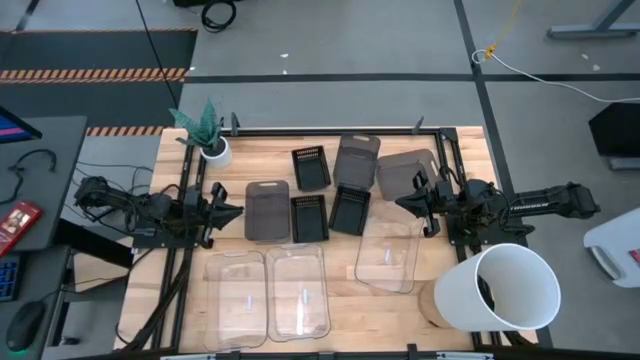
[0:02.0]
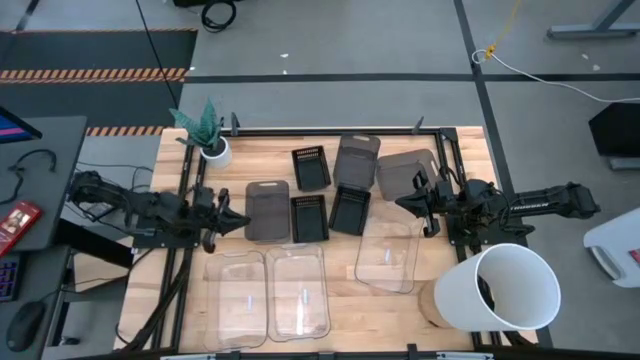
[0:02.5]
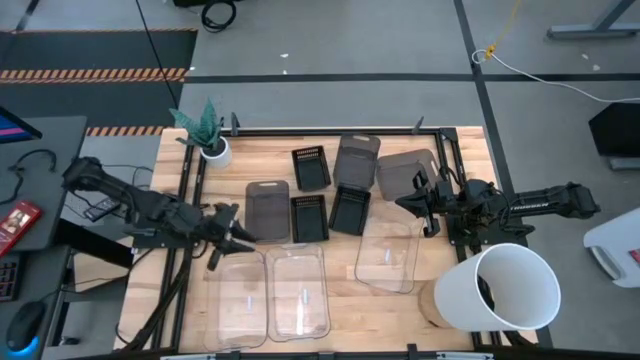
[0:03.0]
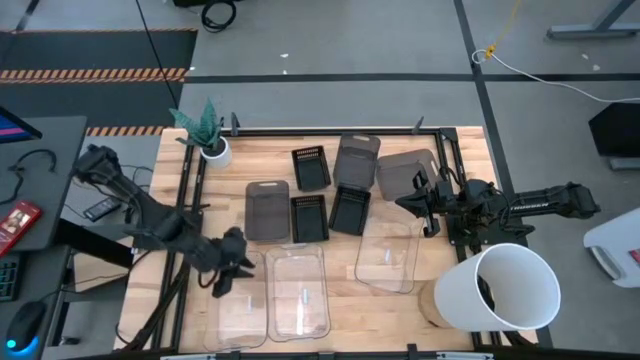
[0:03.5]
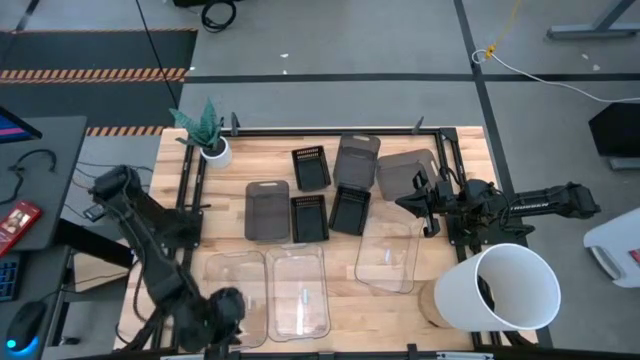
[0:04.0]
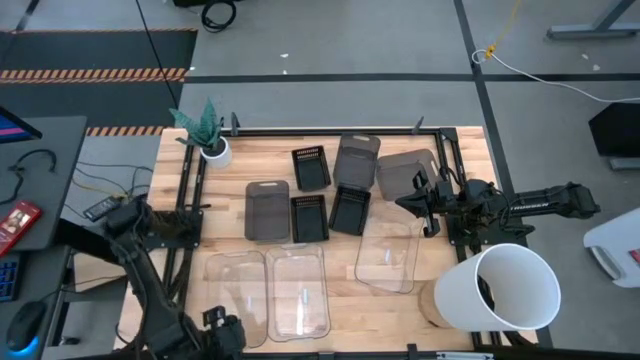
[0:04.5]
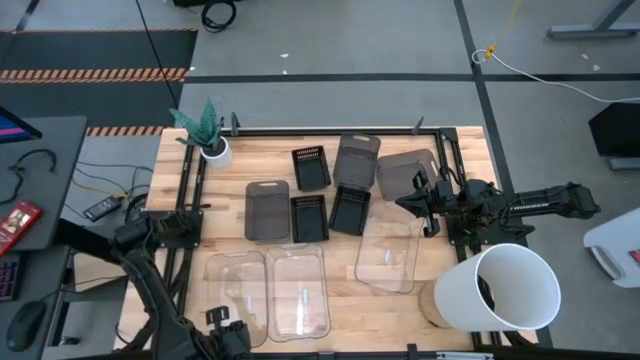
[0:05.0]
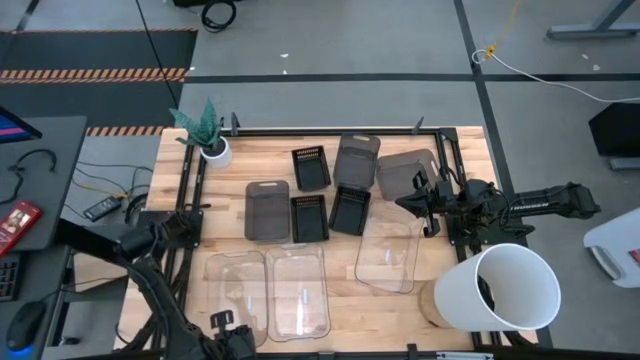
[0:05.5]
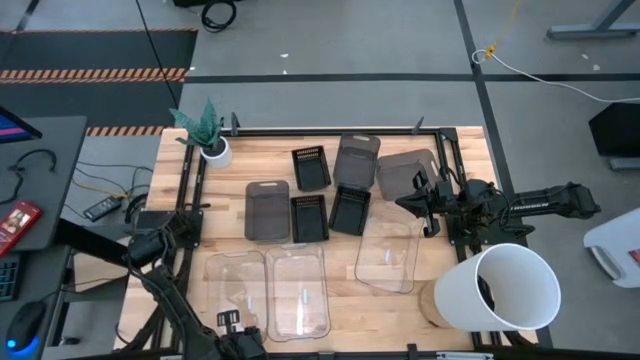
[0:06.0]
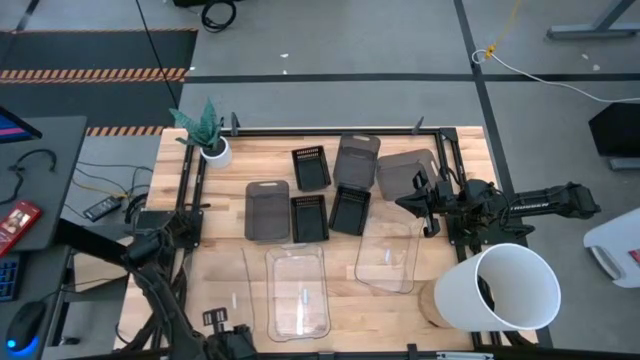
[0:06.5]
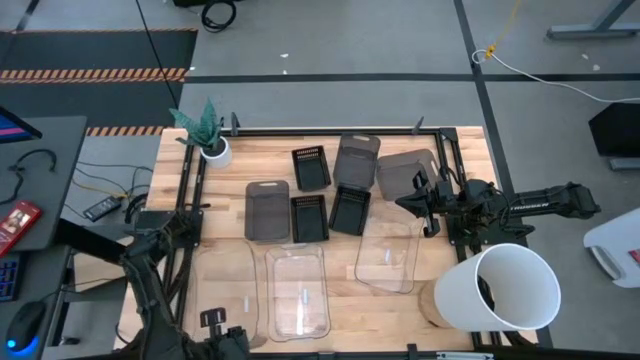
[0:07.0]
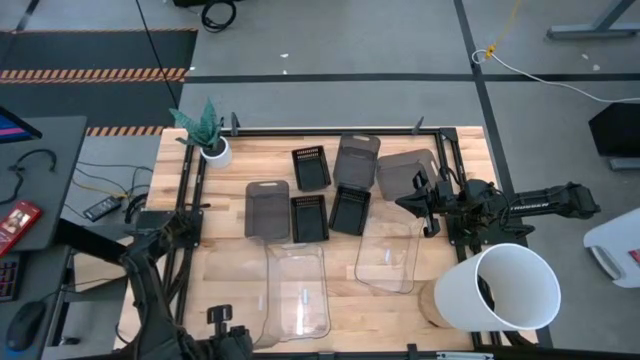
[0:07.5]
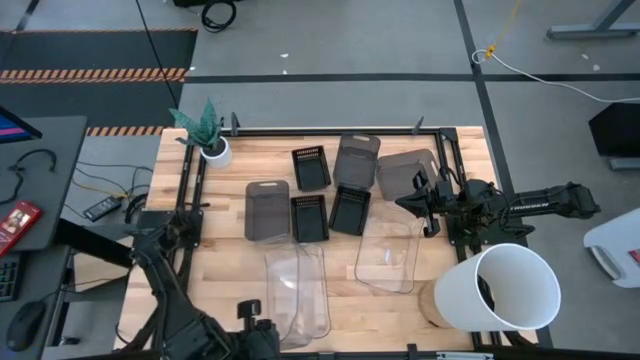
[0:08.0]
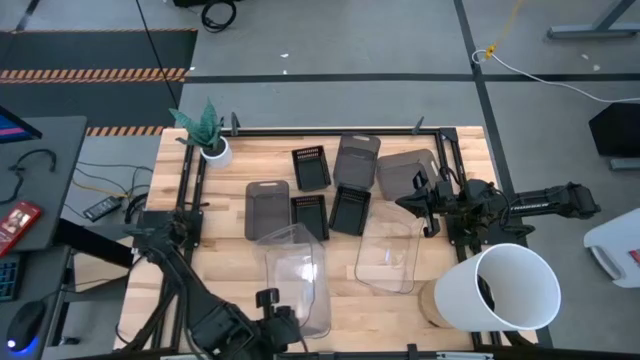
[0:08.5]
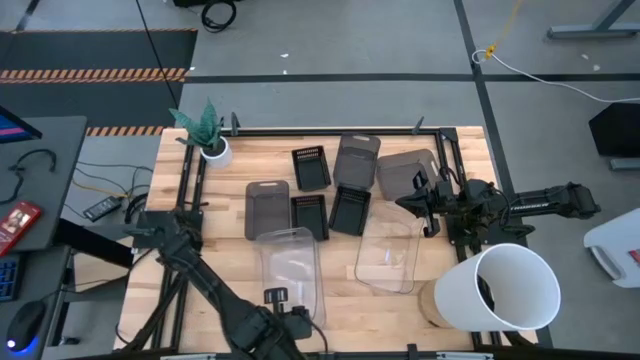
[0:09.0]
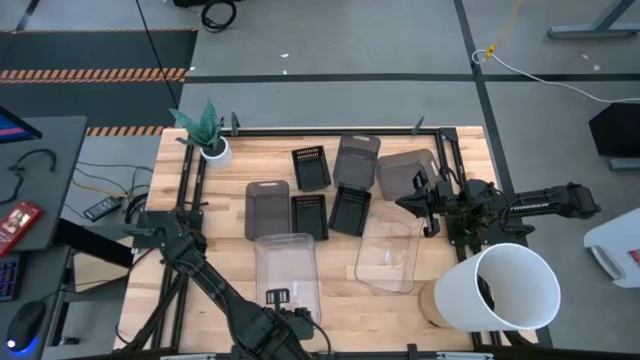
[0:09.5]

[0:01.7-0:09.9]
Stack the left transparent bin on top of the middle transparent bin

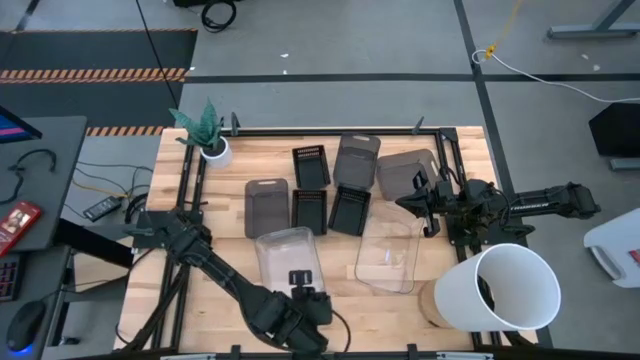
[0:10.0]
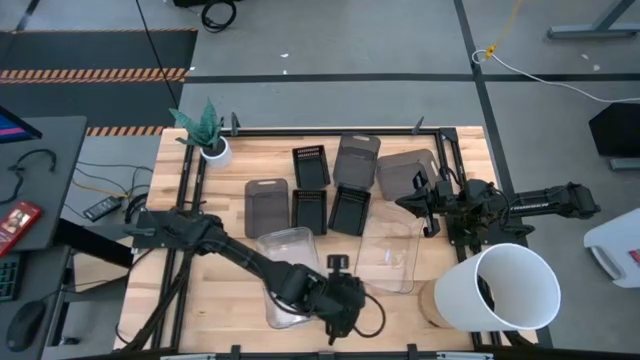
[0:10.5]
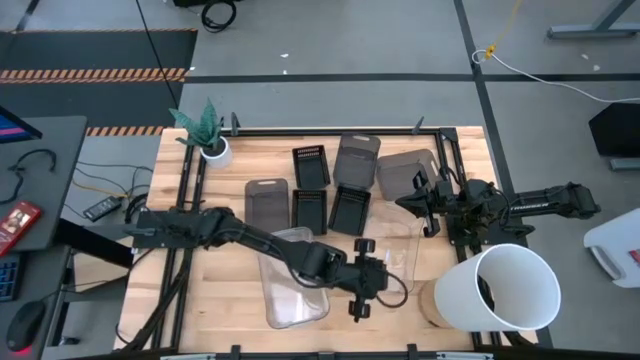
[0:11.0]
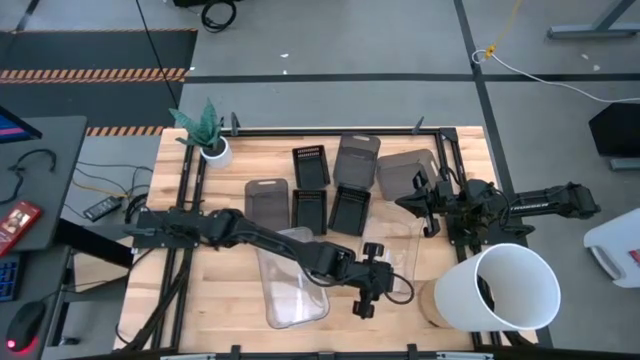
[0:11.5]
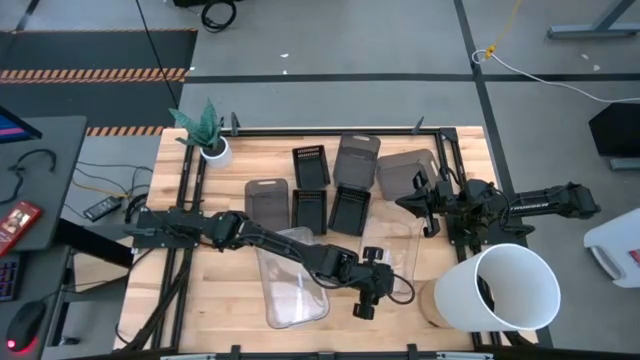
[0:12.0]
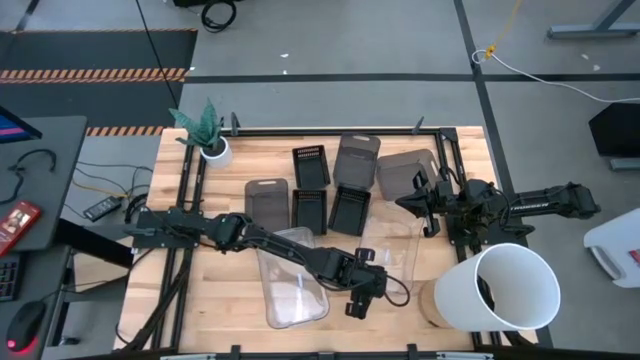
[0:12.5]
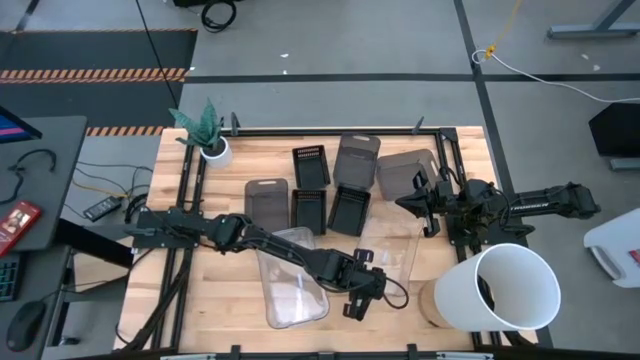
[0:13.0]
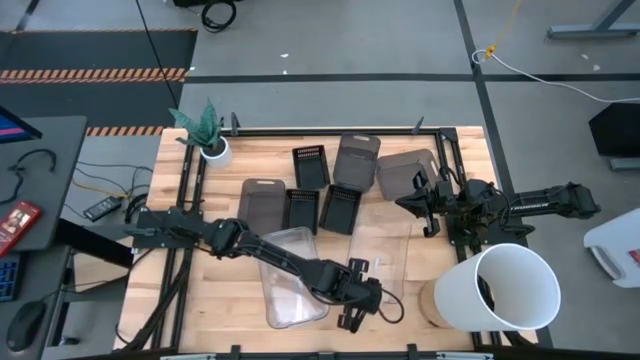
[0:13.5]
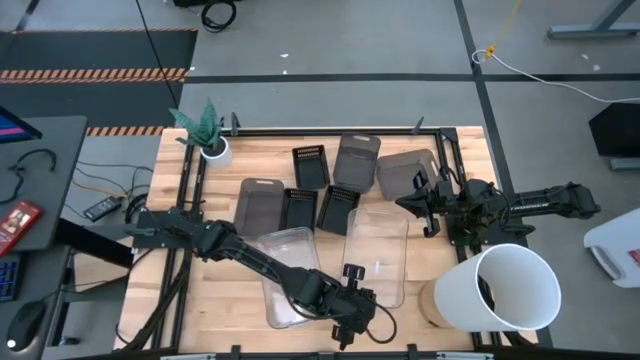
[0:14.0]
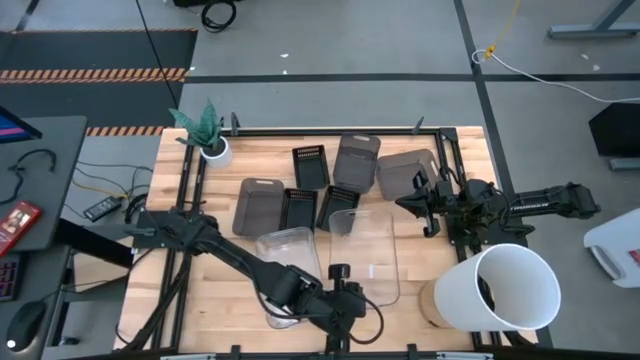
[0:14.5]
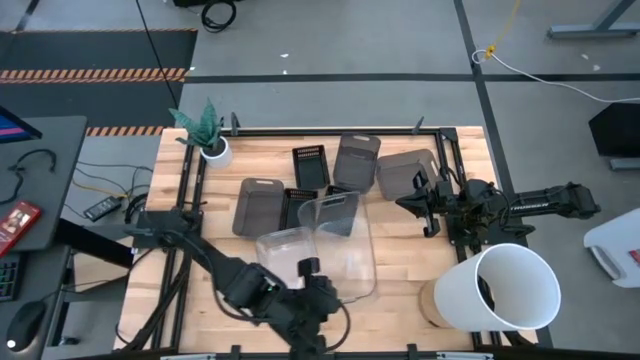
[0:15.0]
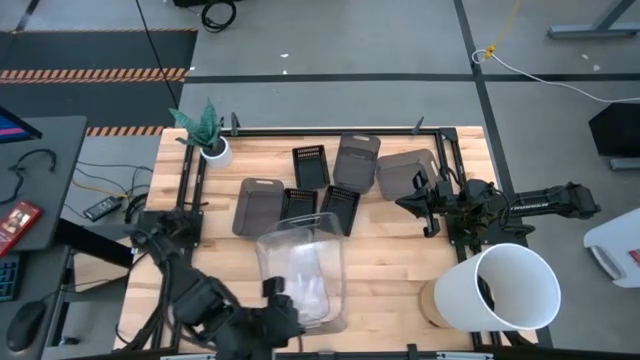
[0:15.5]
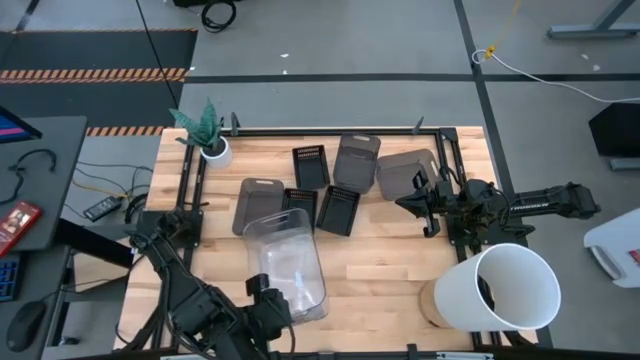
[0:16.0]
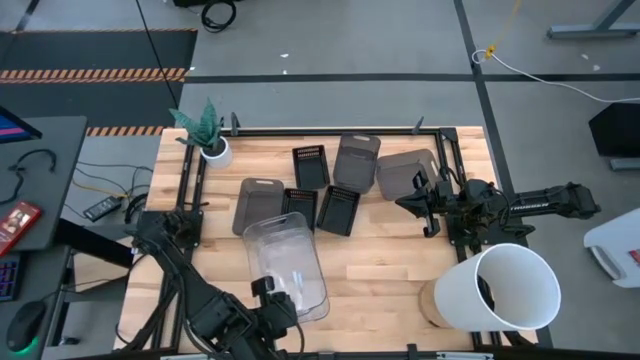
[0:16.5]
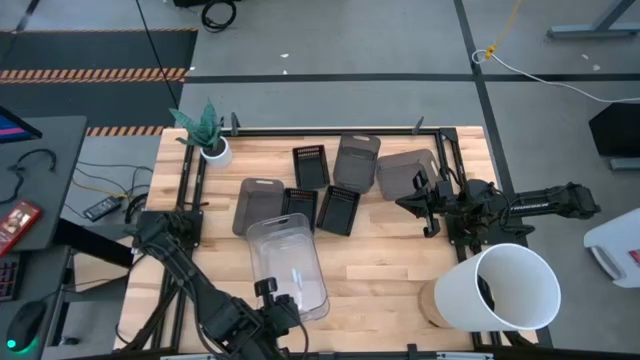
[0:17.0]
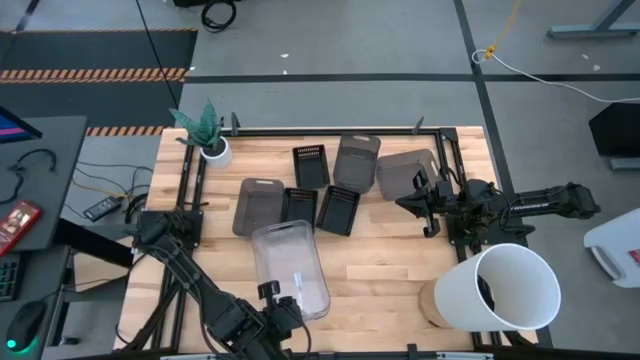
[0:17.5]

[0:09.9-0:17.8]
Stack the right transparent bin on top of the left transparent bin
